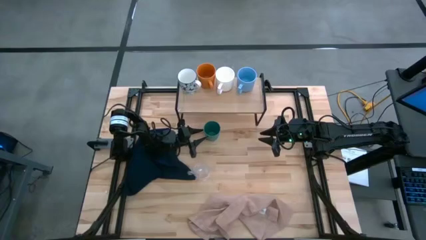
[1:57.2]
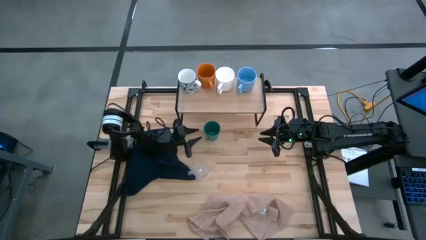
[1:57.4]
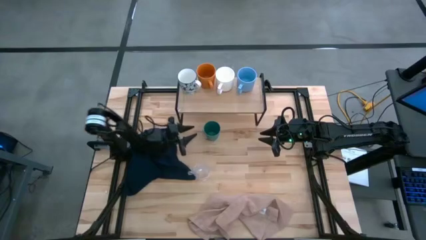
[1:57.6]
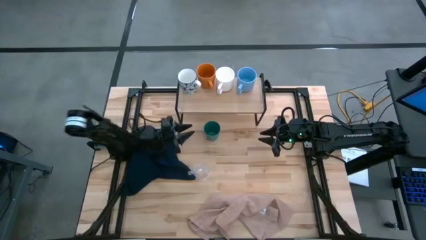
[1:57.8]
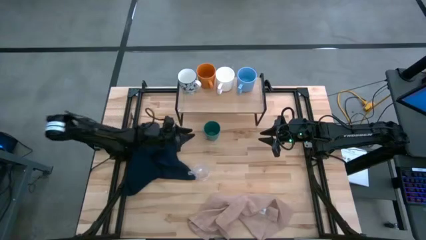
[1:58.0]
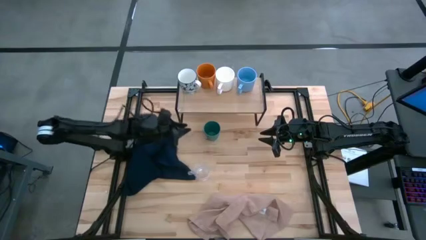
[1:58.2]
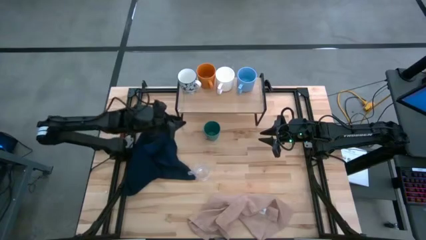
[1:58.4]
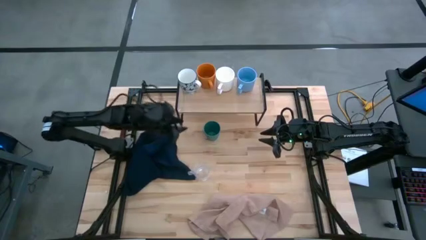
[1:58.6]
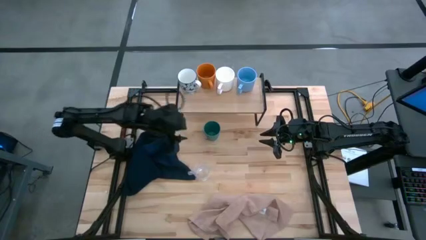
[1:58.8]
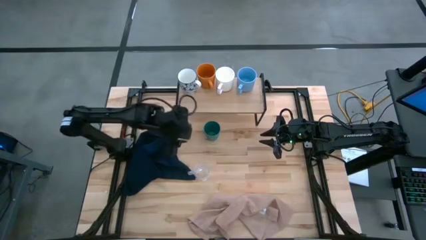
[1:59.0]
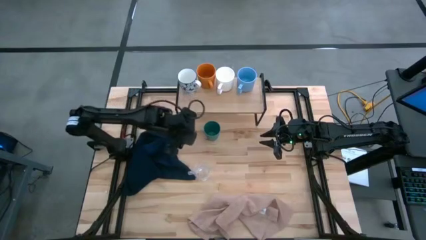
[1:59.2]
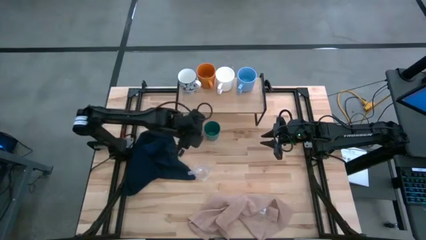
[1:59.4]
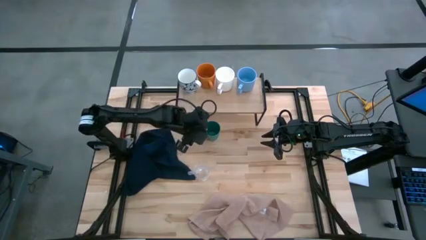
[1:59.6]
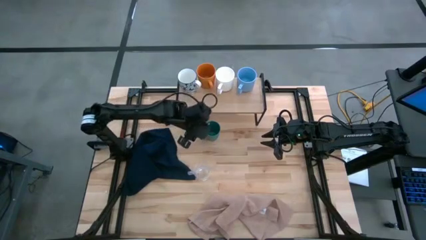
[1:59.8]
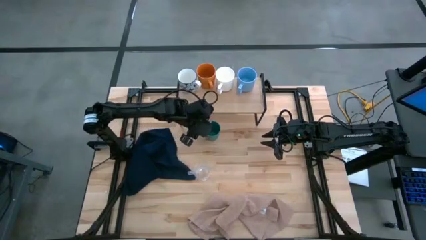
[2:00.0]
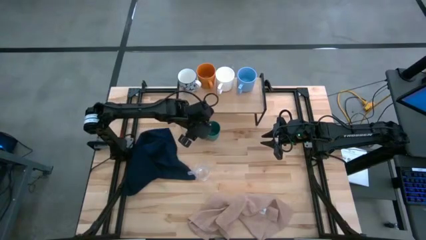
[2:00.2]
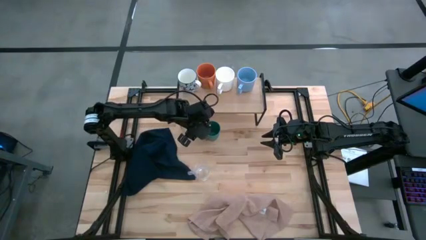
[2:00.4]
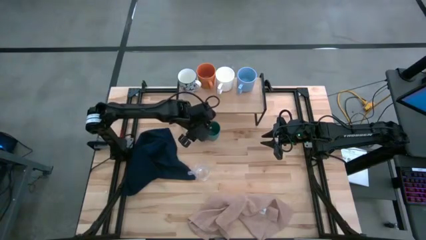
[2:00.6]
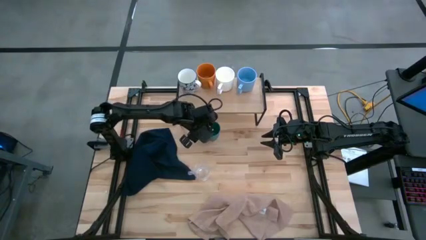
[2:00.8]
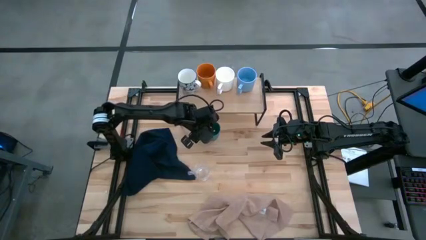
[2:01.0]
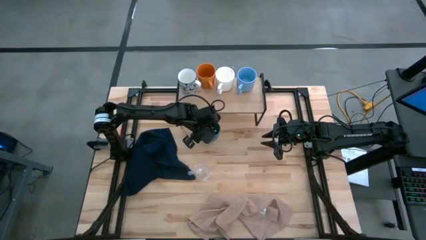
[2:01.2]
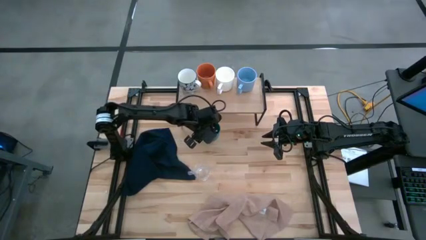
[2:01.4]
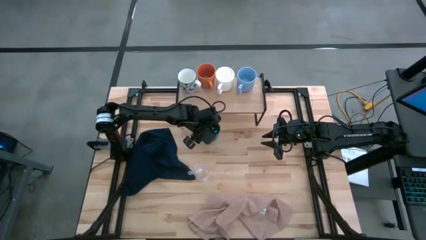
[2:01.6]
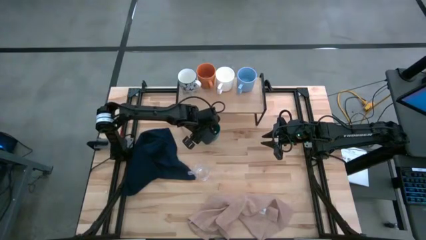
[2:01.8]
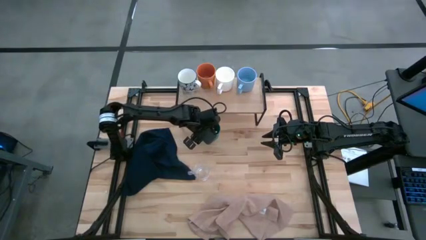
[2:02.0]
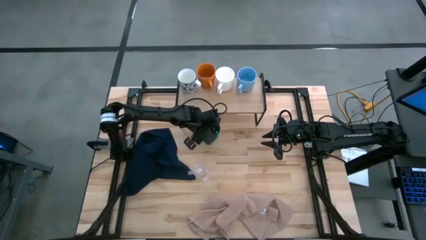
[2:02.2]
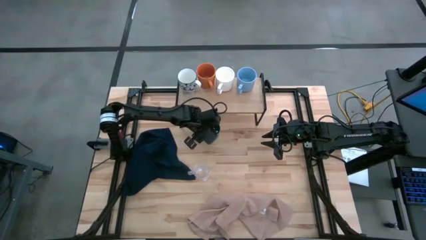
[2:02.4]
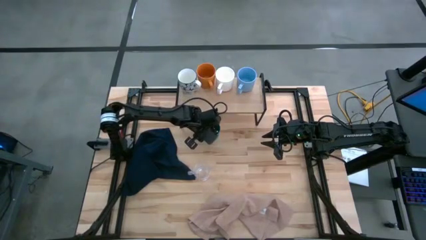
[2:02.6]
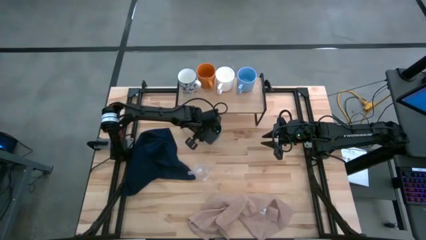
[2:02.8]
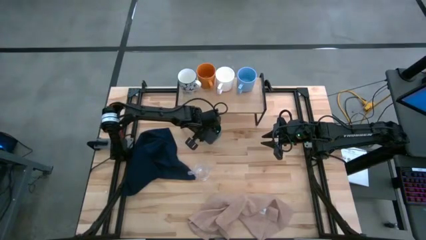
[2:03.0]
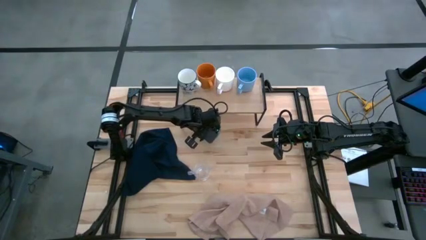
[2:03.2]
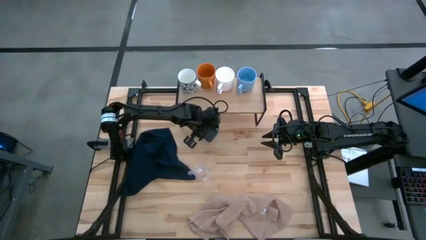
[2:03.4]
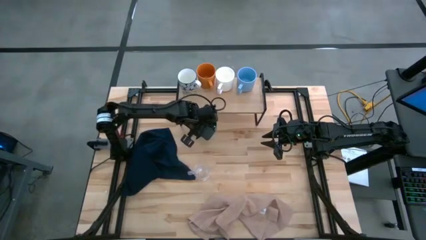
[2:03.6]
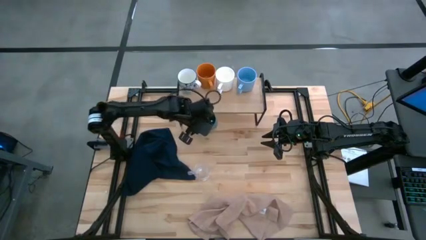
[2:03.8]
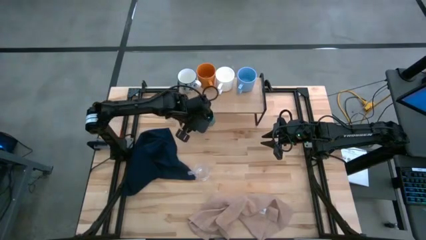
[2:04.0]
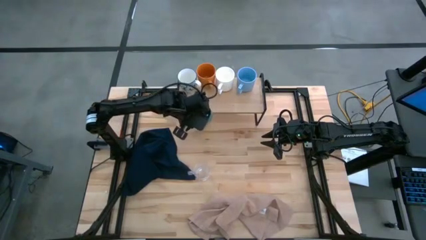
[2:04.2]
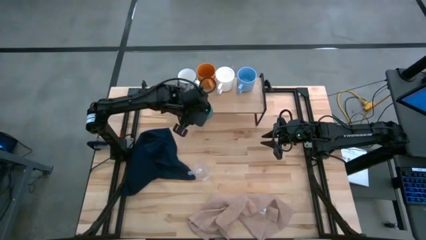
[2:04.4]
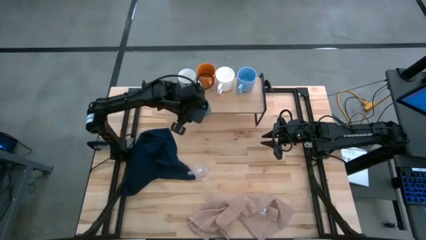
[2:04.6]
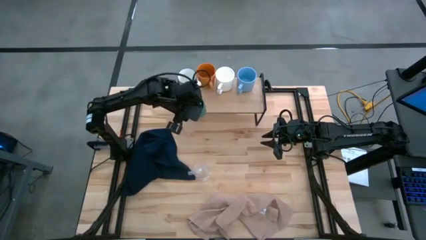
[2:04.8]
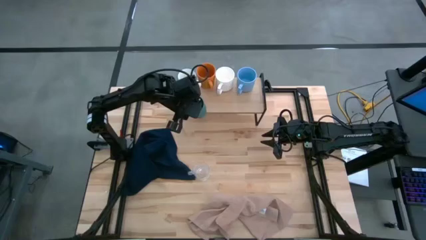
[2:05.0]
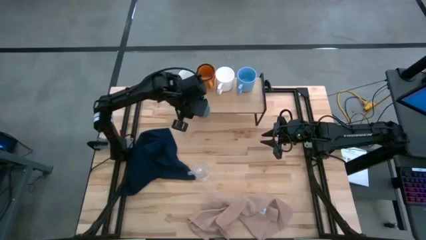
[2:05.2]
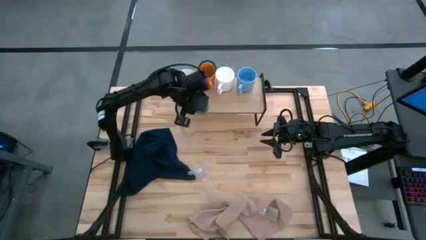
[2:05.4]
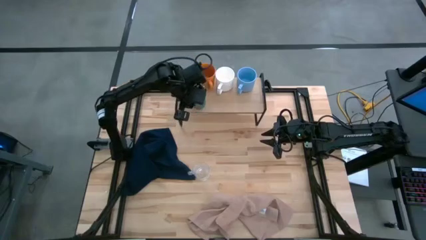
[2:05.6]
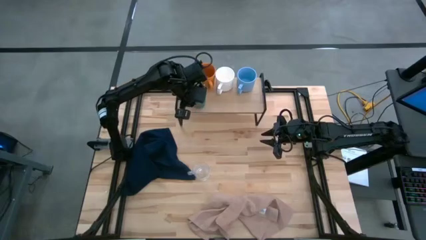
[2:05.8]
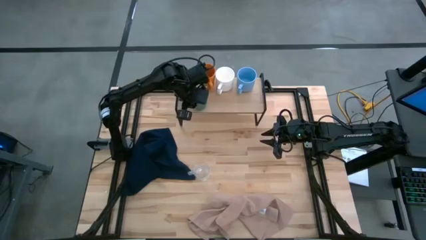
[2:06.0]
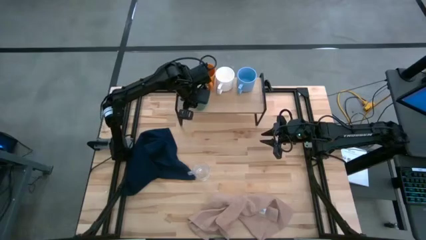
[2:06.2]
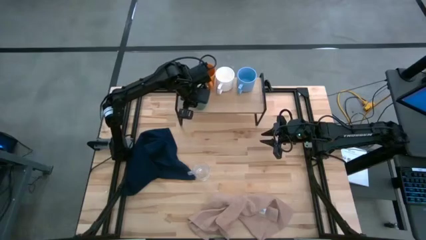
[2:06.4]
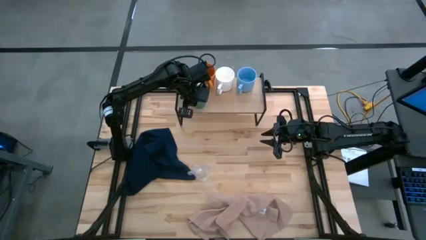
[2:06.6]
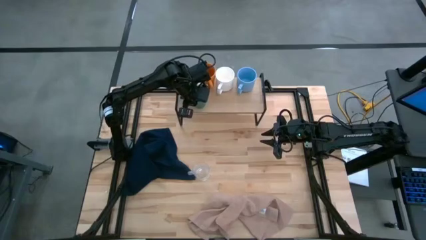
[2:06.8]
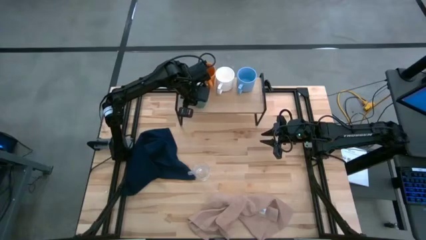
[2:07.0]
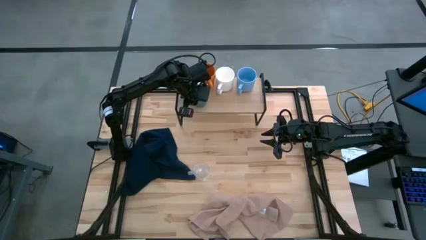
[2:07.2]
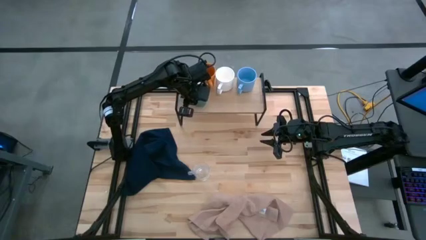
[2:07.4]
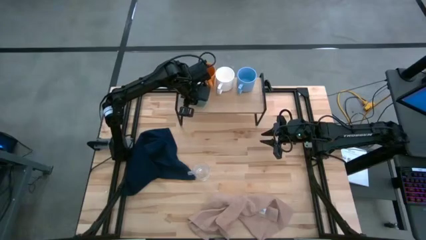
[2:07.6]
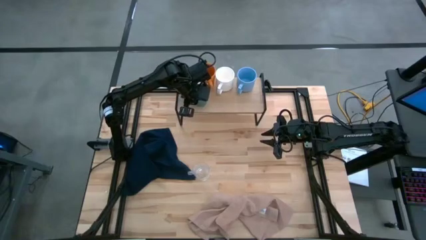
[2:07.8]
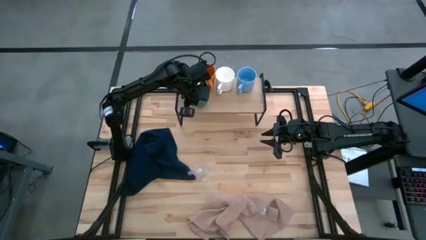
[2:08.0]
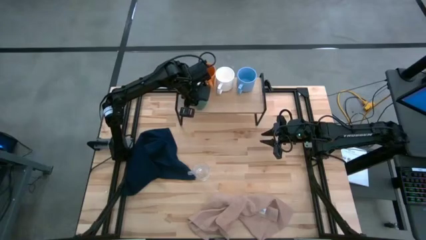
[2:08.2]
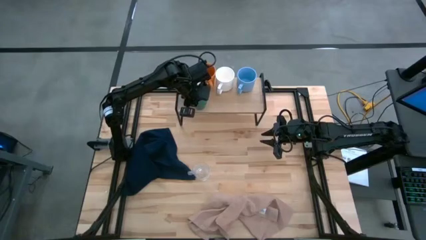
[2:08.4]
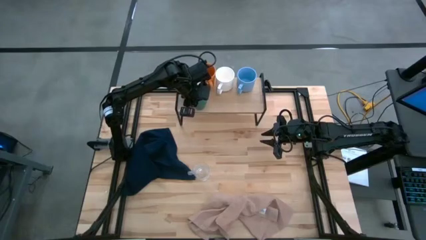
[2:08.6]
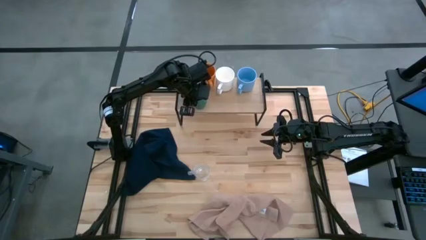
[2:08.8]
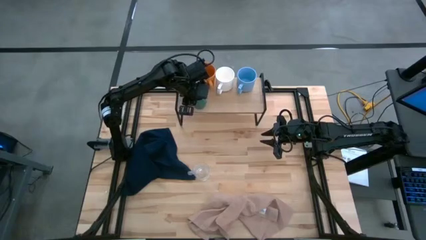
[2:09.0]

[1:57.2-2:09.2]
Task: Stack small to large cups/mugs on shelf
Put the green cup on the shelf

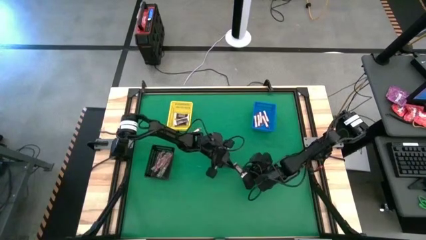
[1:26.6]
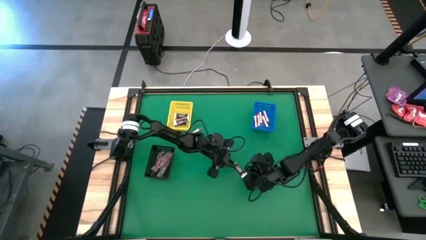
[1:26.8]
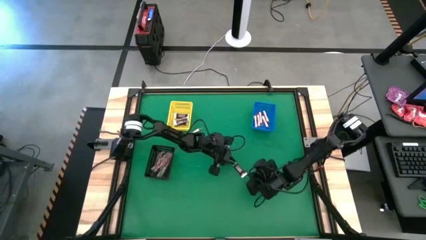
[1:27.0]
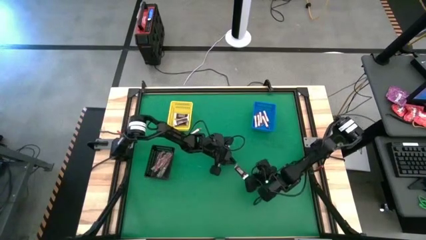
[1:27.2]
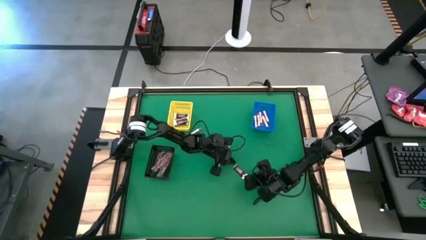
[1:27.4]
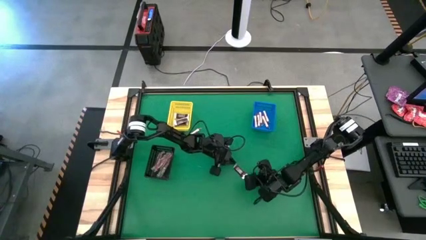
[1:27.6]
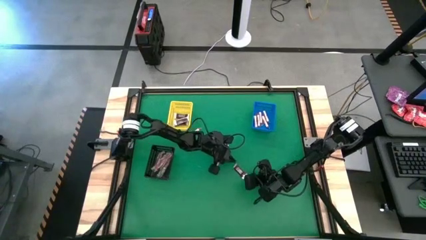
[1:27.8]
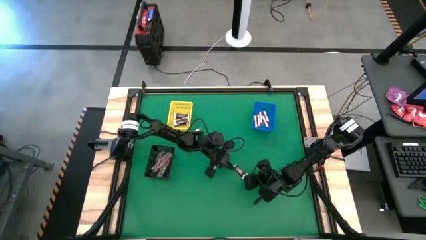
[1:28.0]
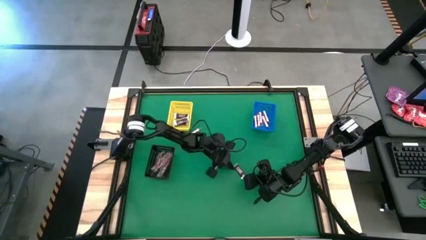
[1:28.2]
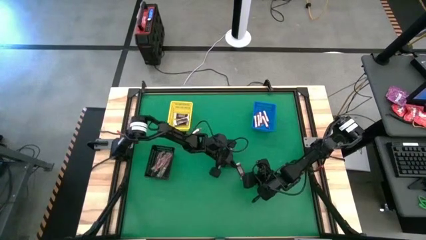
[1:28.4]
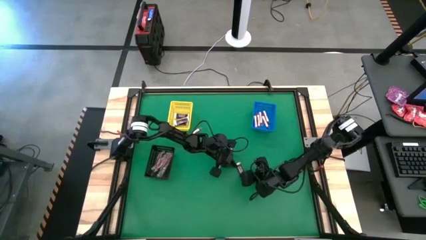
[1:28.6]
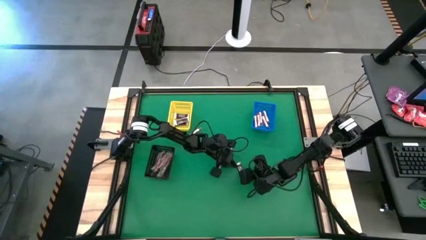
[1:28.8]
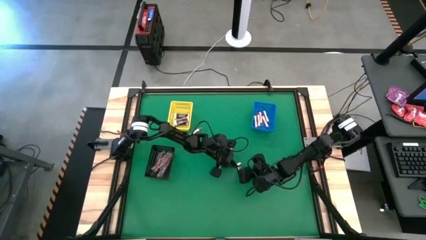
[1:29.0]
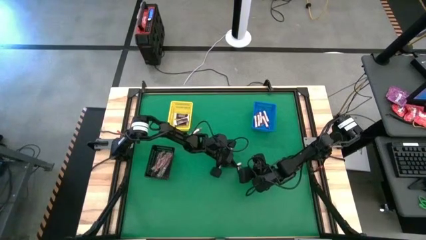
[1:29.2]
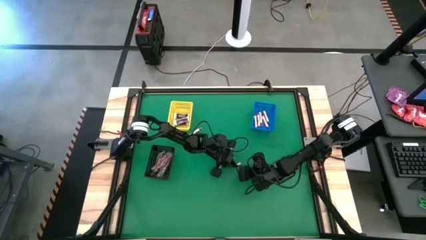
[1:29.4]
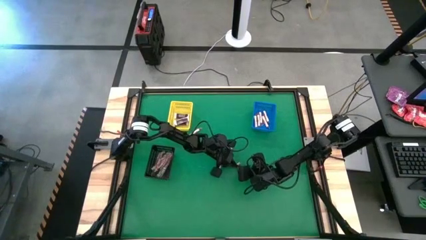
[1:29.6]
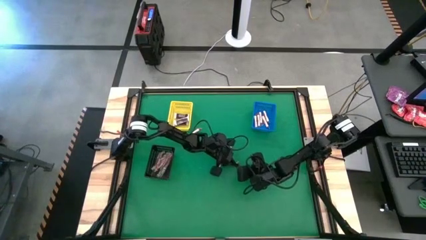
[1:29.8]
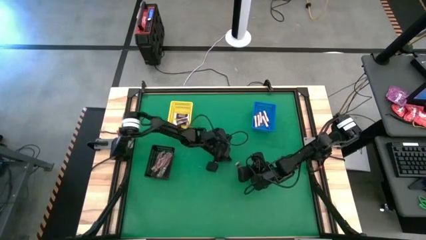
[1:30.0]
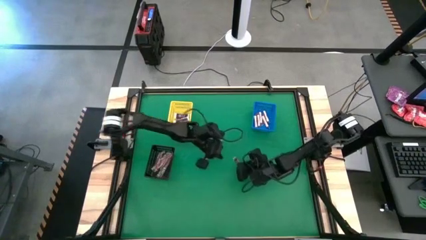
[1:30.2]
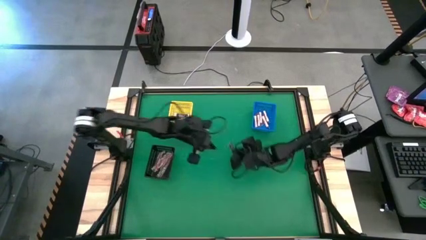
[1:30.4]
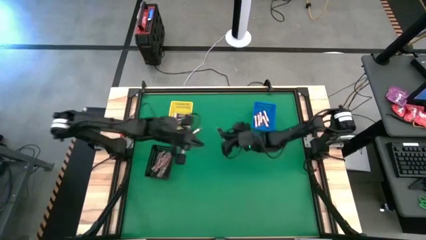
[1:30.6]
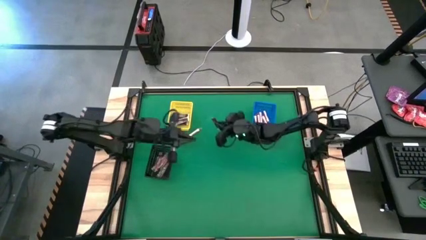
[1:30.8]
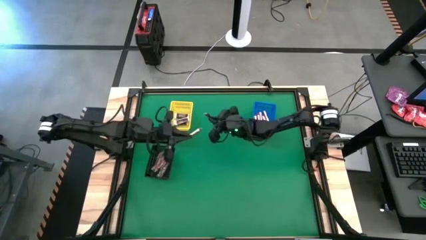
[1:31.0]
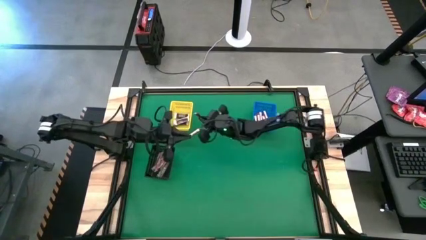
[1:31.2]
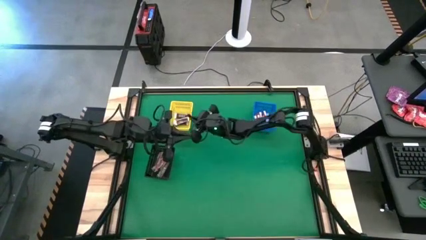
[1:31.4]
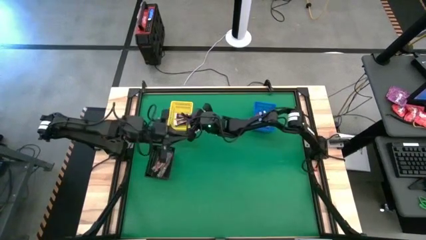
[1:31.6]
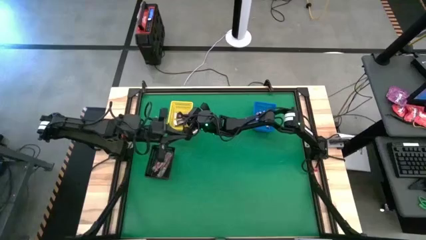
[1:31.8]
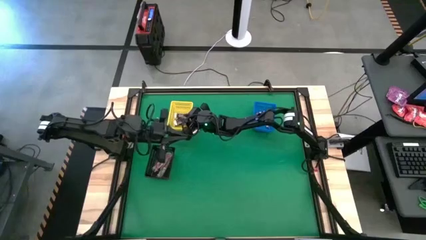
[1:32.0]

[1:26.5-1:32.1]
Task: Sort candy by brand, put in halloween buckets
Put the brown chocolate into the yellow bin
